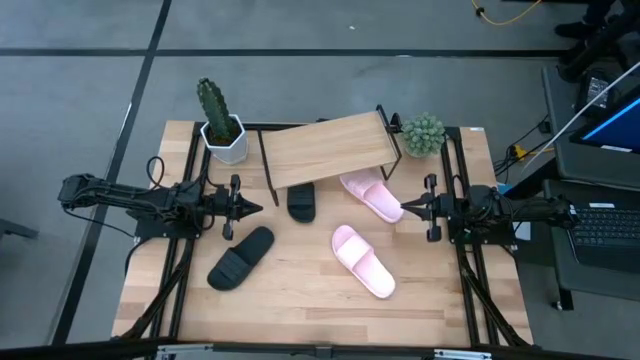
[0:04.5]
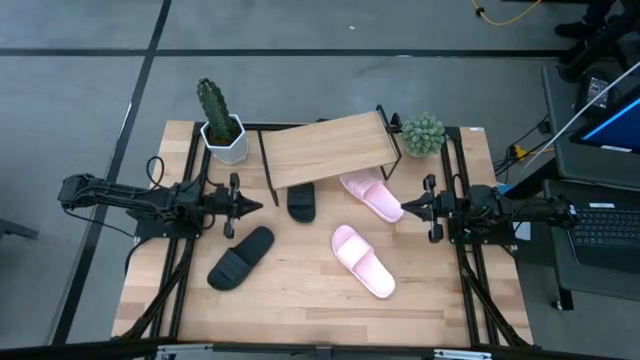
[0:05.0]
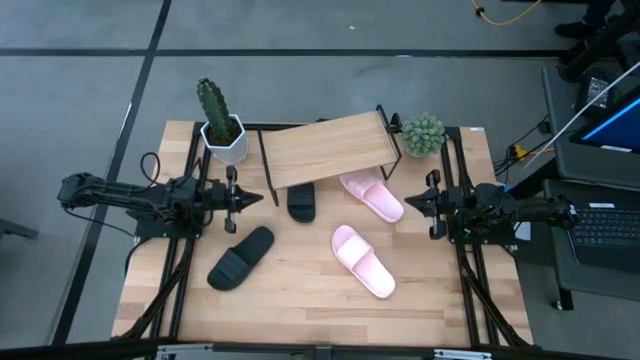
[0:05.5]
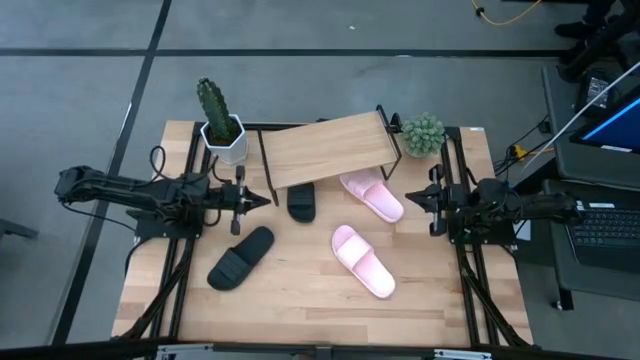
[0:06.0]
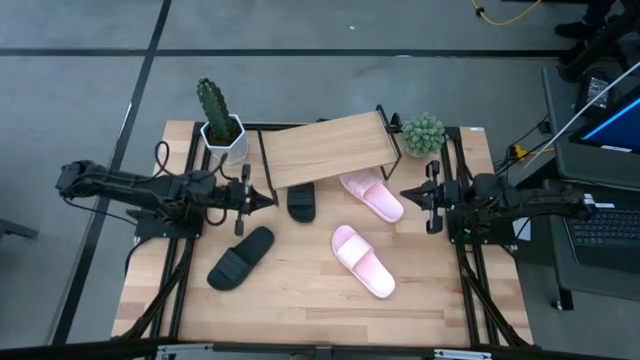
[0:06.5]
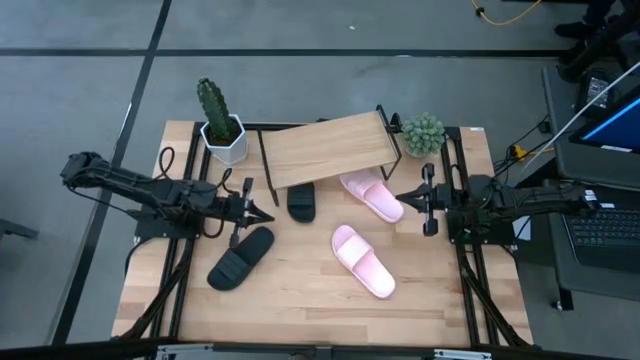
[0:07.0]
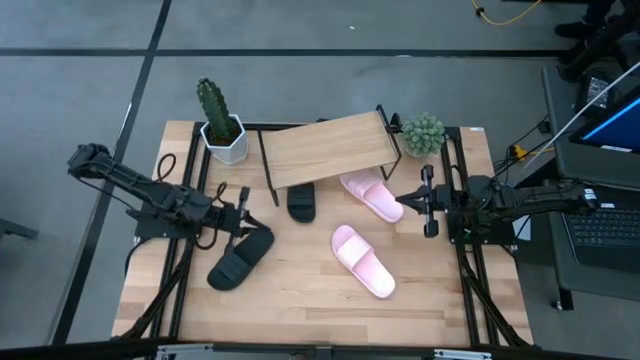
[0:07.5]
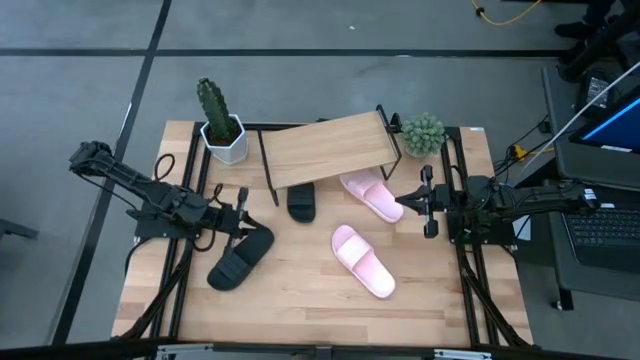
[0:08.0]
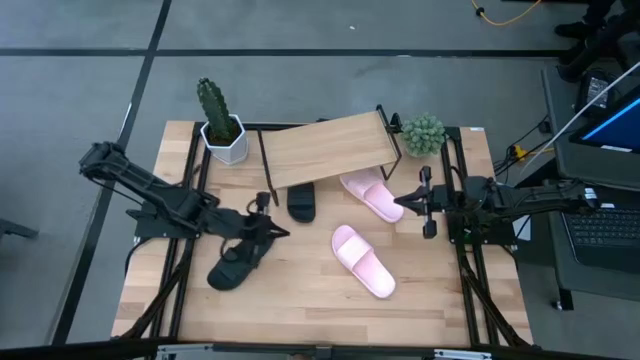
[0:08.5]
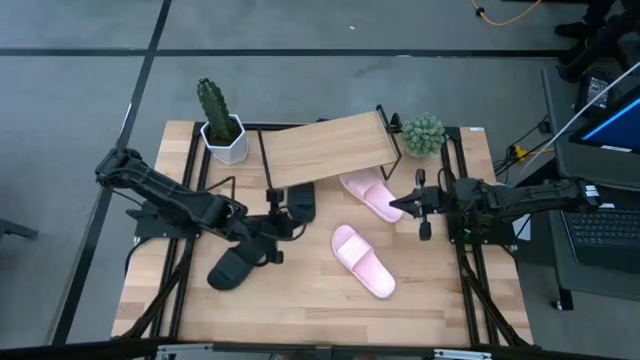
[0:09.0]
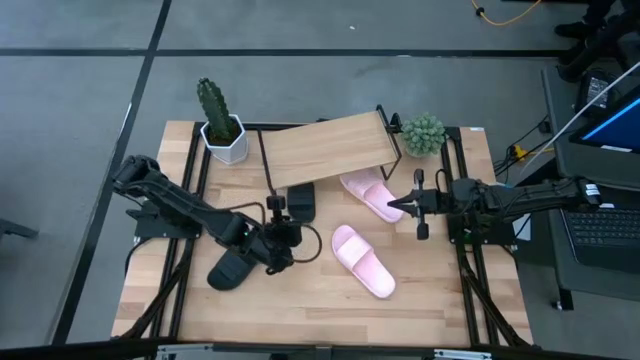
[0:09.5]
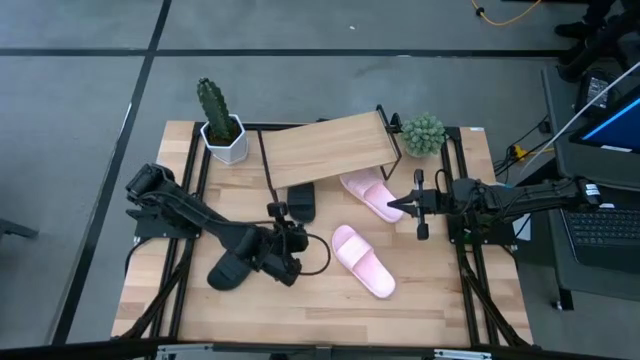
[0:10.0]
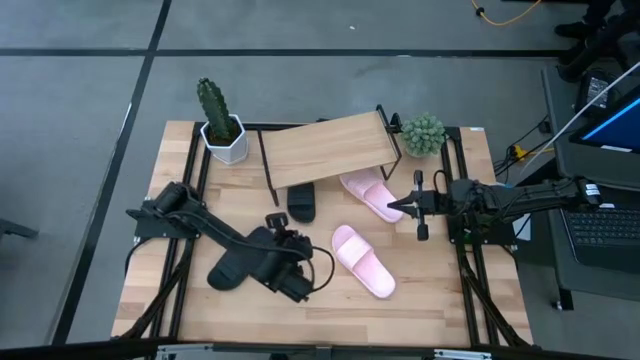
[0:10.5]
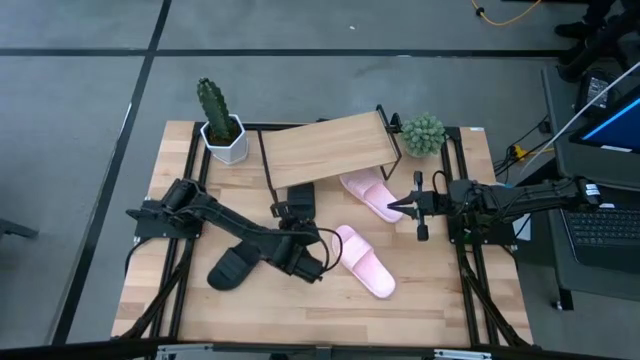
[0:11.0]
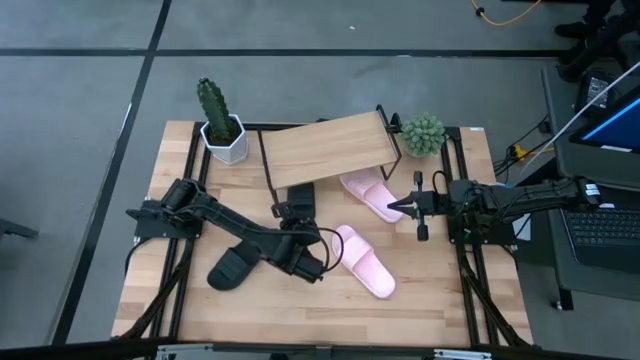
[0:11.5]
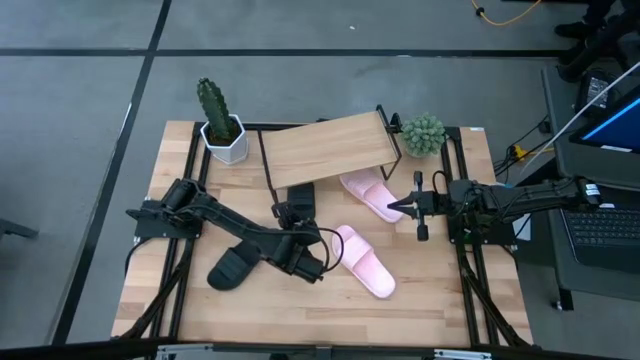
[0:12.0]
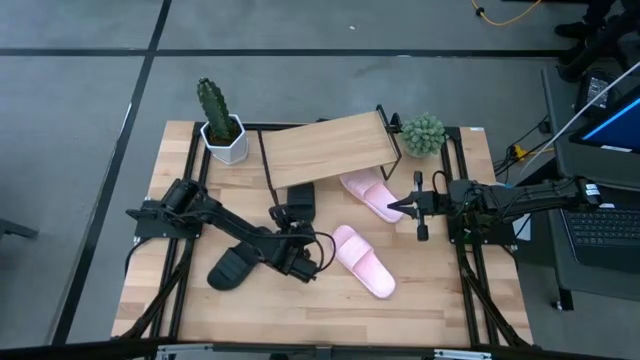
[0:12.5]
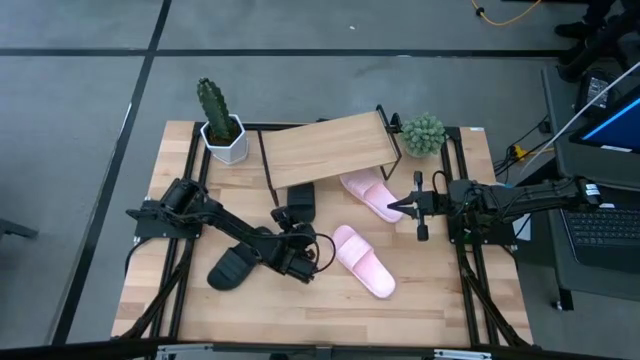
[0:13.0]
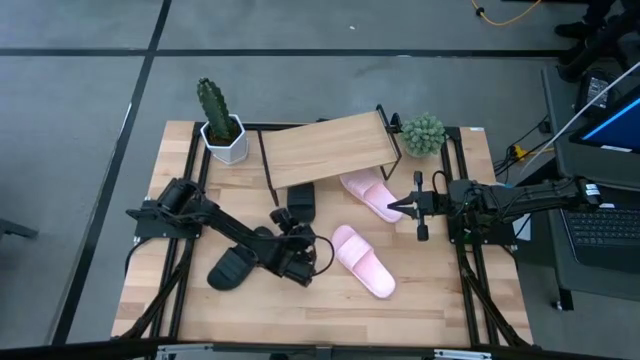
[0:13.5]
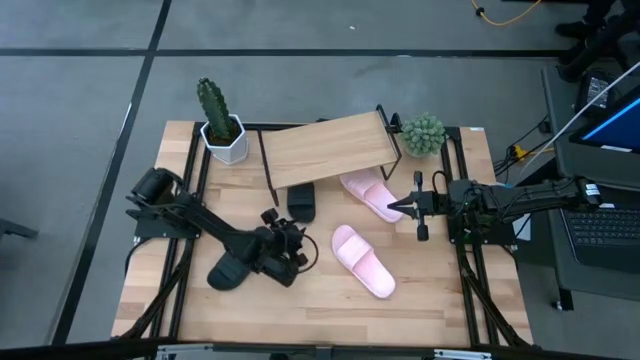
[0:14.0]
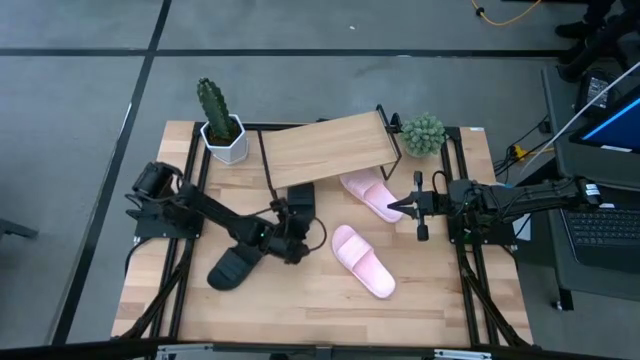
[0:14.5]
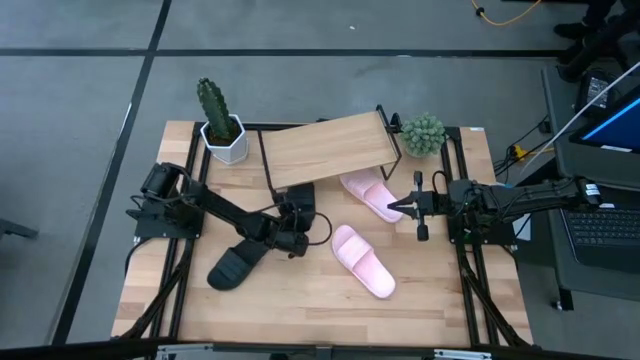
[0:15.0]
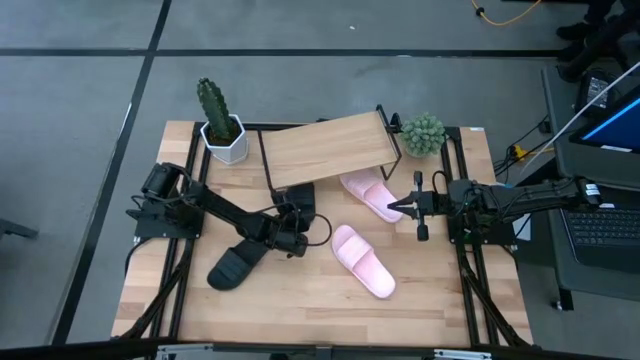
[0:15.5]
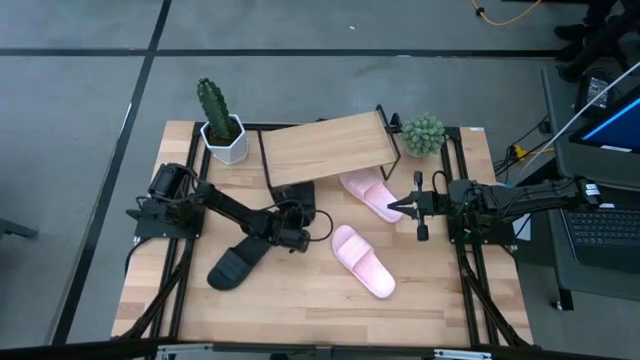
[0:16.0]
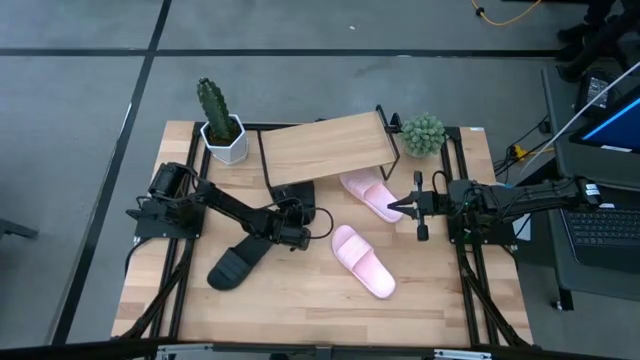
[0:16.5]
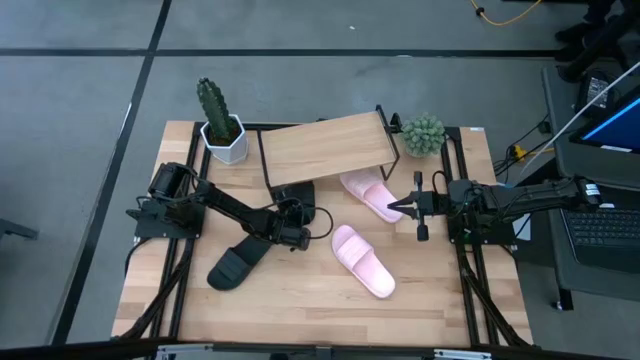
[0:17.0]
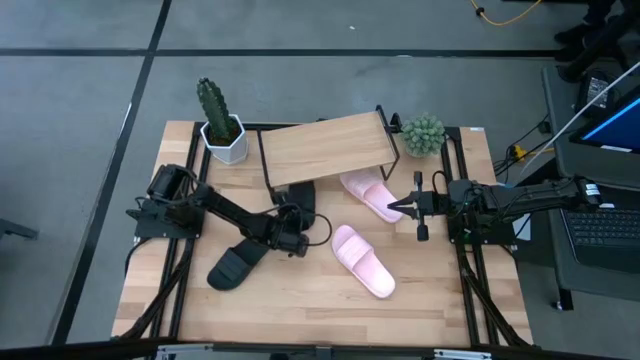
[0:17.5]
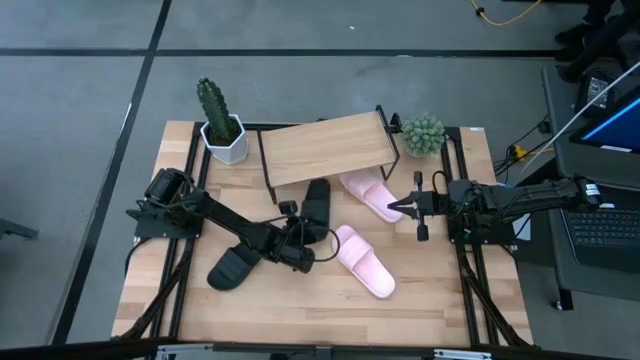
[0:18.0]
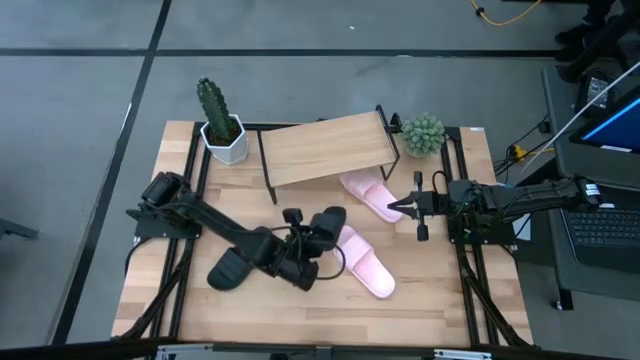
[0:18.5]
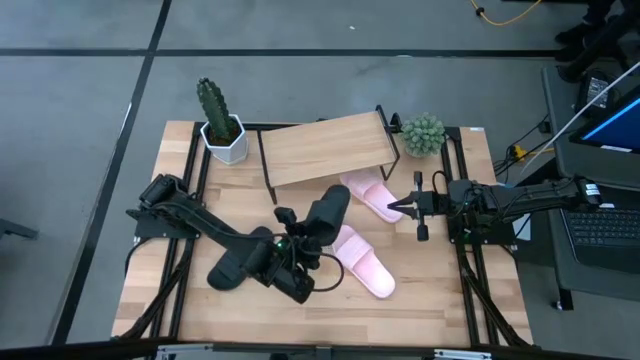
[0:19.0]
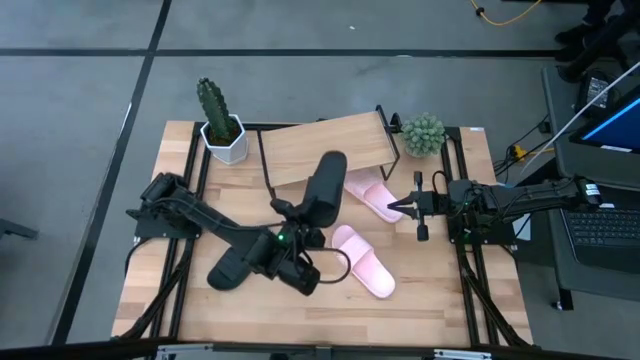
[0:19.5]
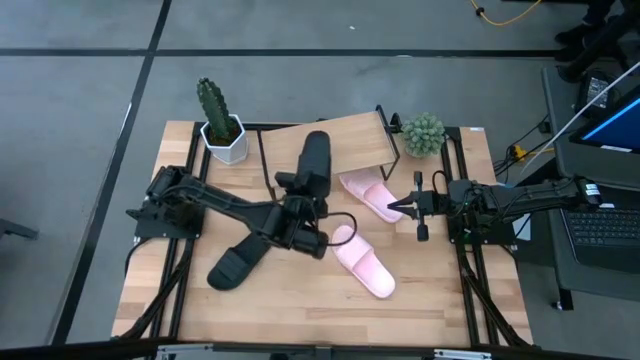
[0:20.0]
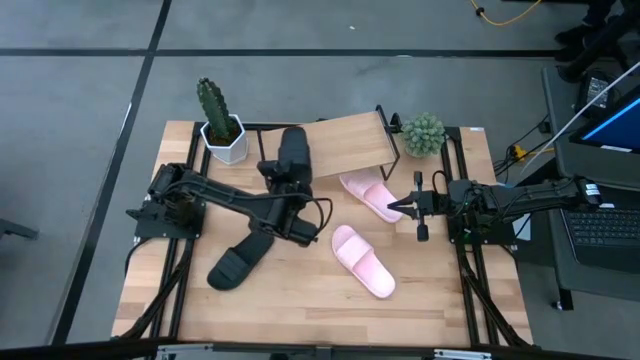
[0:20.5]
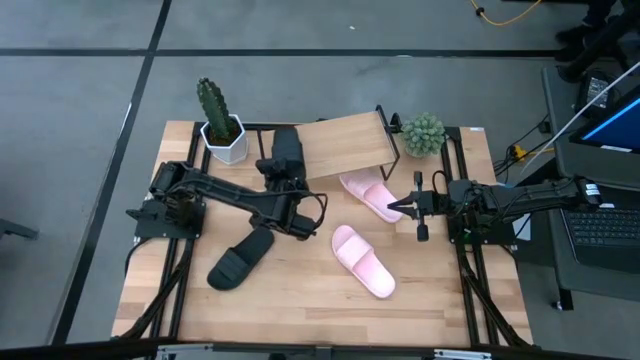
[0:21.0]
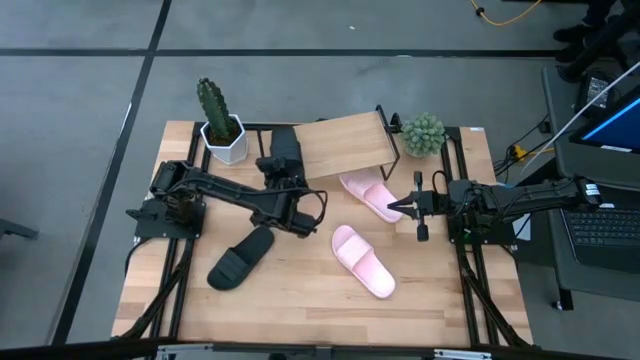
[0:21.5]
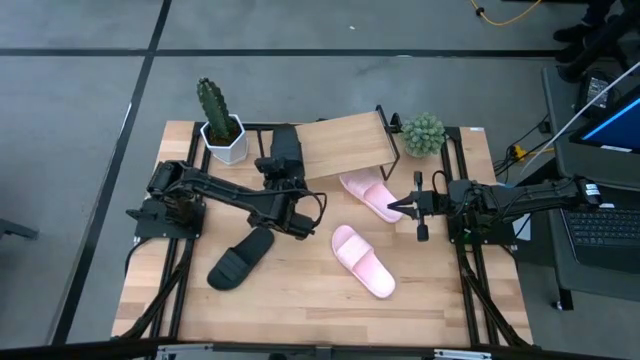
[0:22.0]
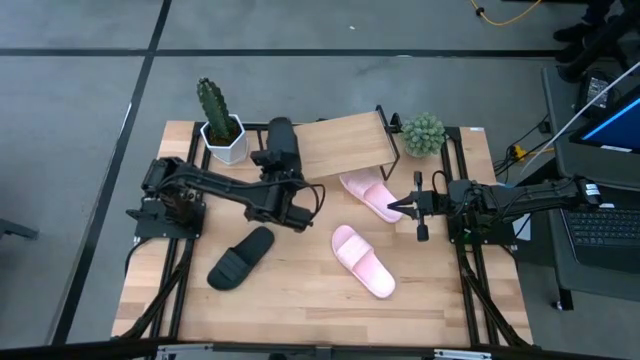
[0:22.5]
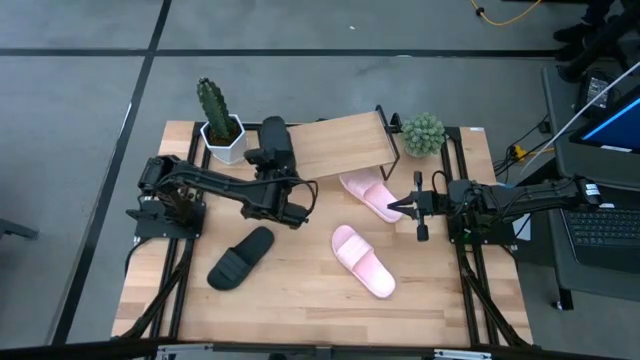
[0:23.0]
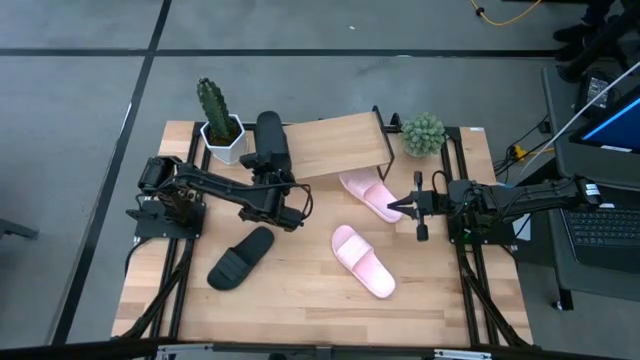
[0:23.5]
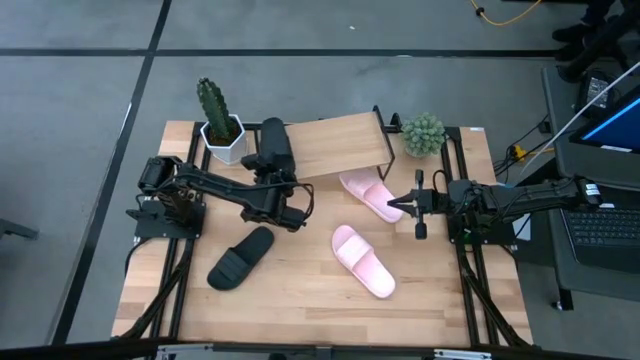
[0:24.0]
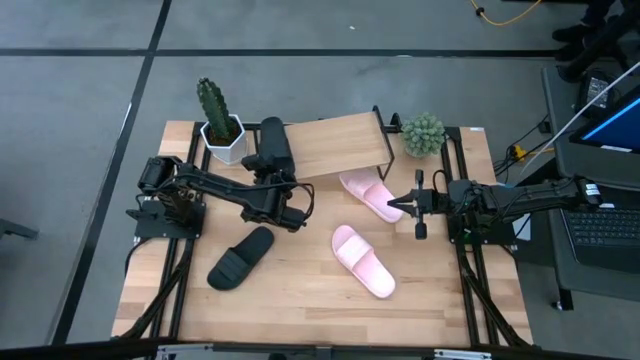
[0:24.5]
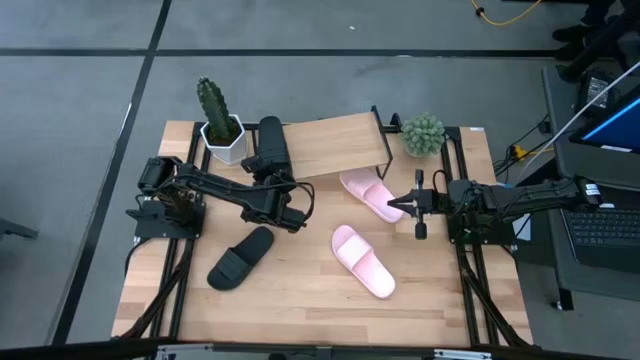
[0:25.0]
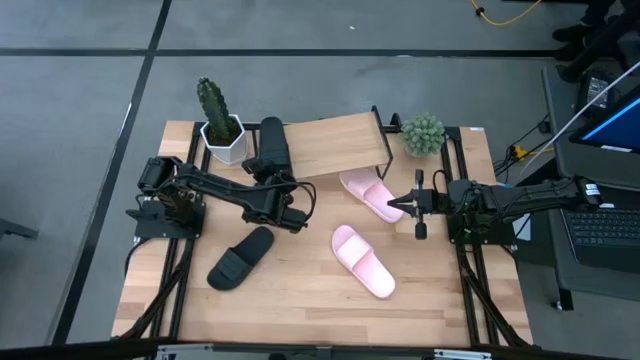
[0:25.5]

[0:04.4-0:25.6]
Task: Pick and place slides into the shelf
Put the top black slide on the shelf
